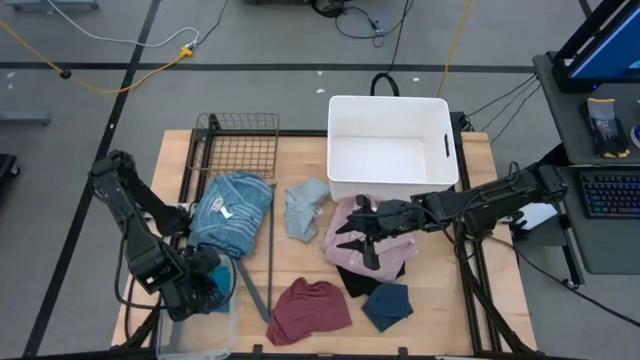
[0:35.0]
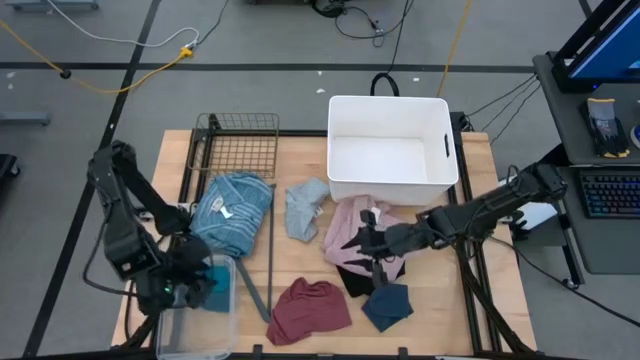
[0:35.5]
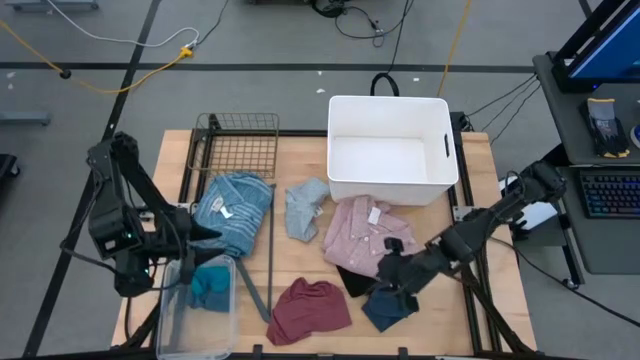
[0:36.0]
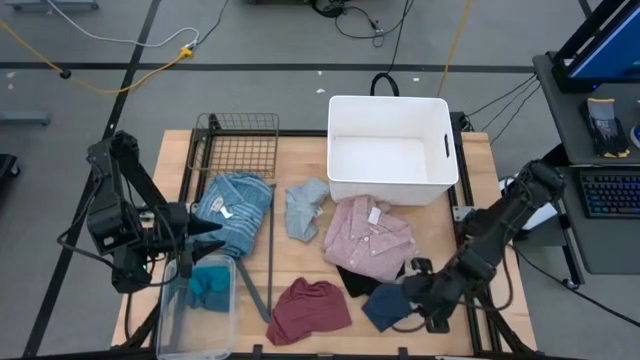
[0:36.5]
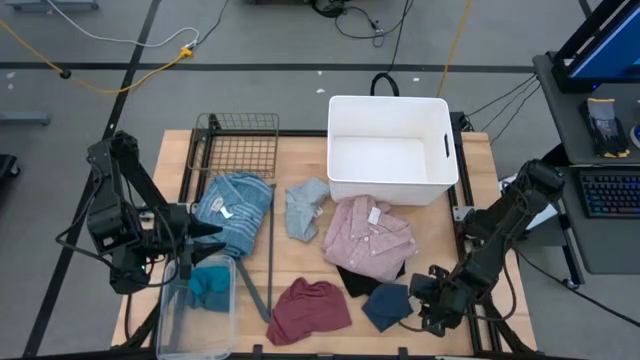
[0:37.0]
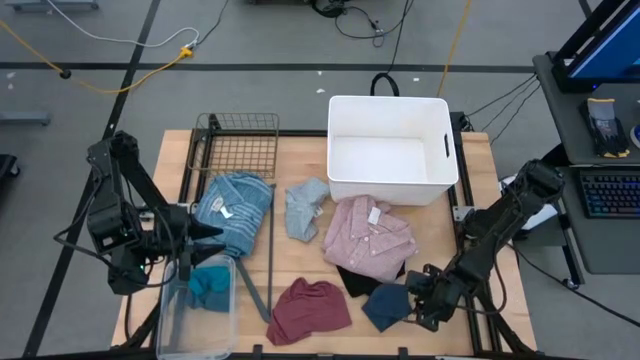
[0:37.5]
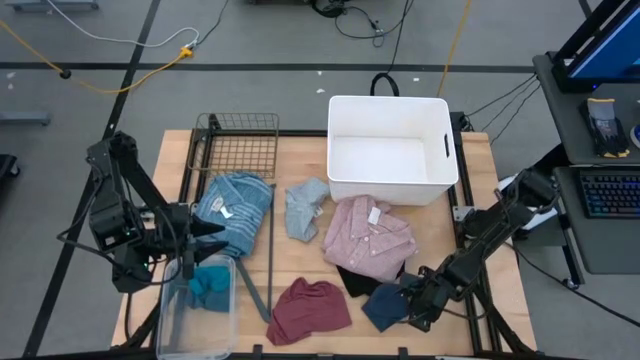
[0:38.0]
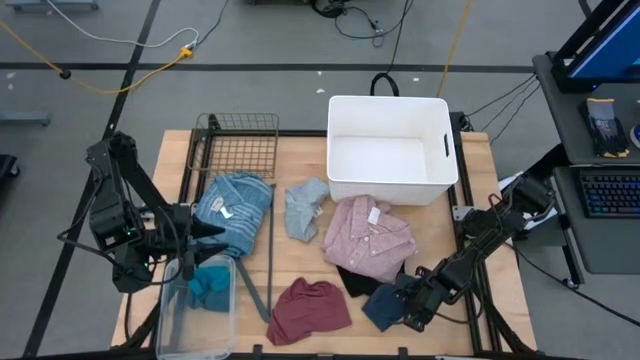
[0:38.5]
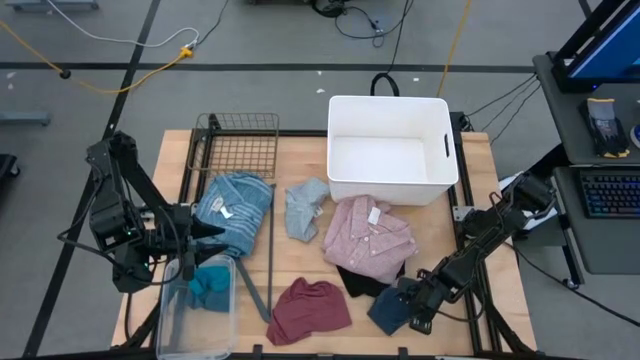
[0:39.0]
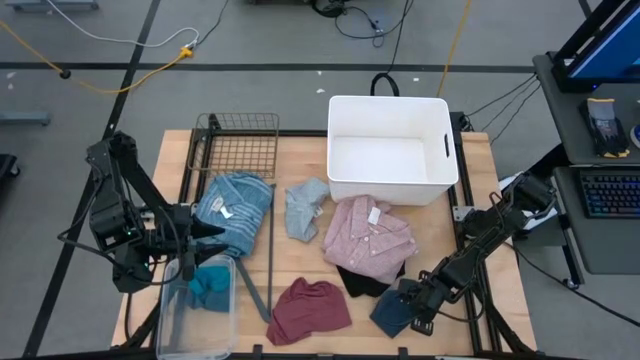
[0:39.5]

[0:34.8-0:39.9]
Task: Pick & Place Cloths
Put the blue sock into the transparent bin

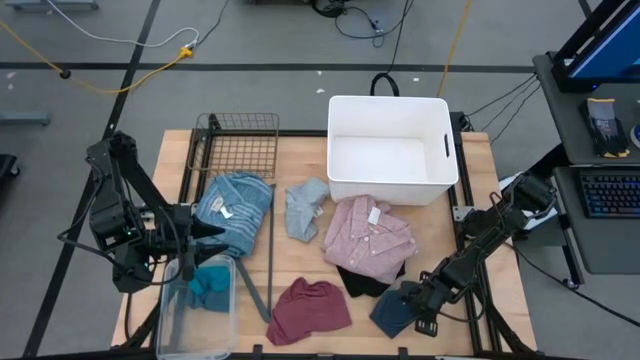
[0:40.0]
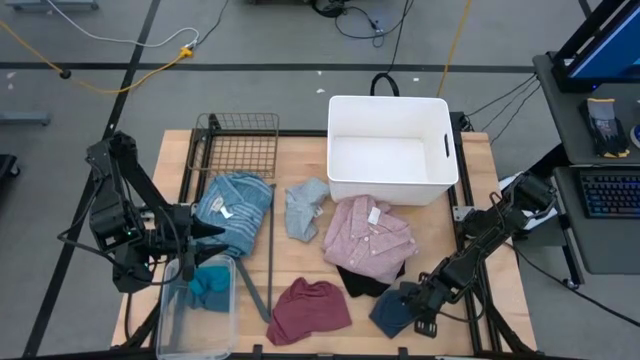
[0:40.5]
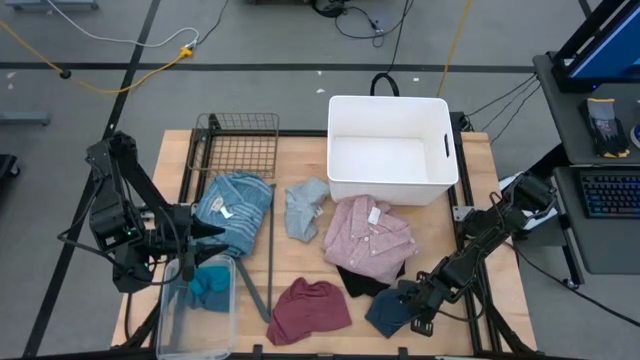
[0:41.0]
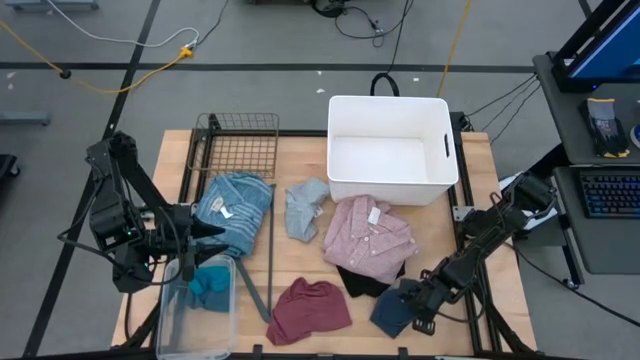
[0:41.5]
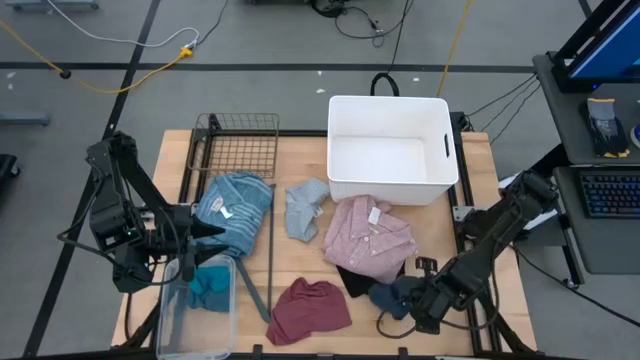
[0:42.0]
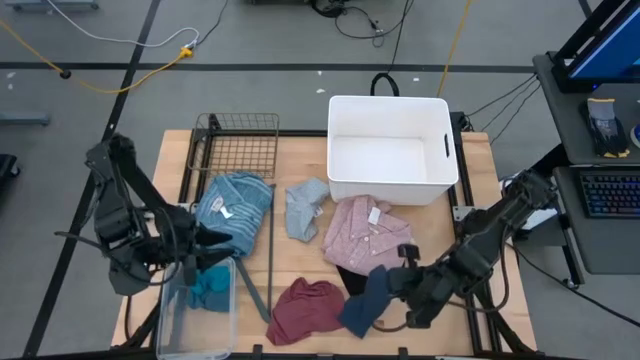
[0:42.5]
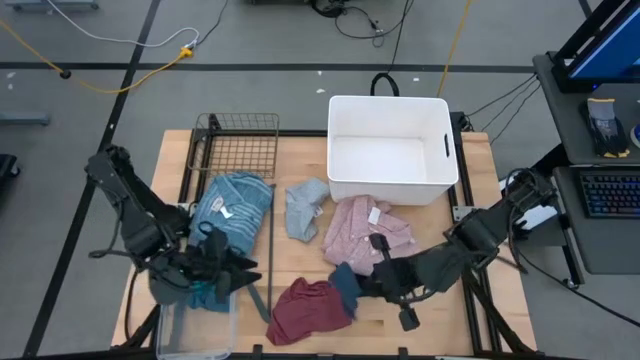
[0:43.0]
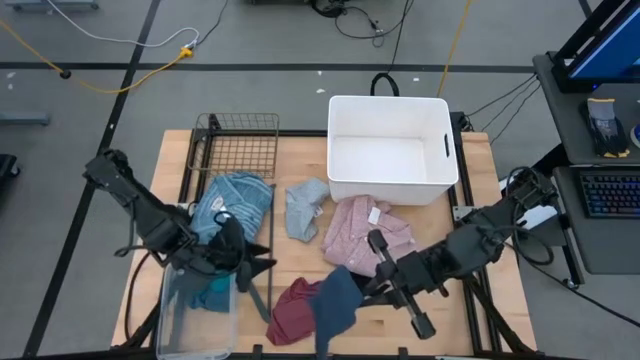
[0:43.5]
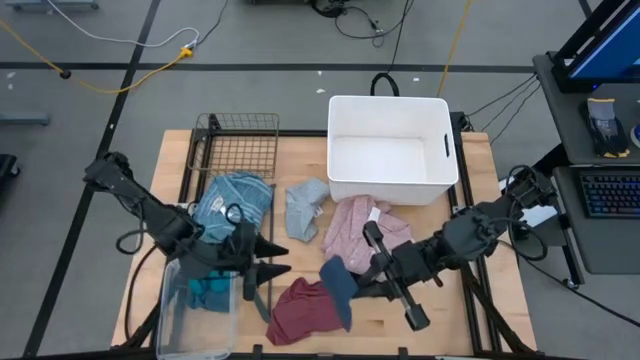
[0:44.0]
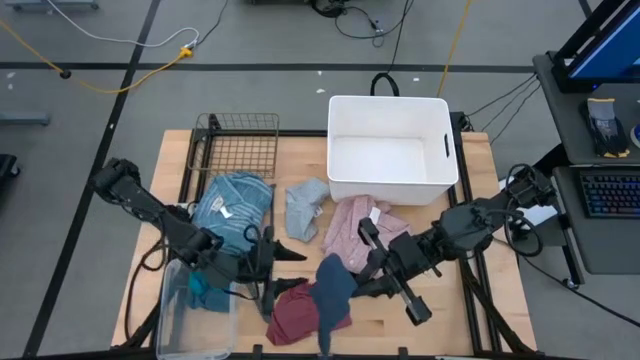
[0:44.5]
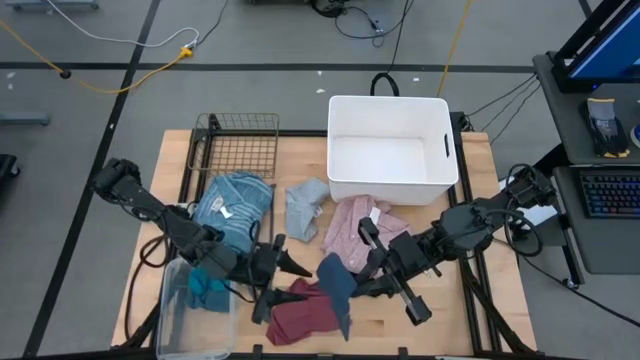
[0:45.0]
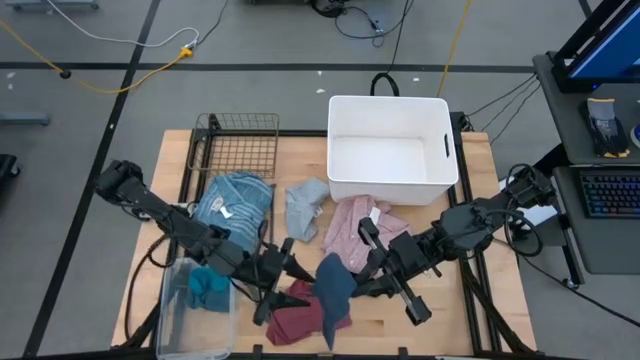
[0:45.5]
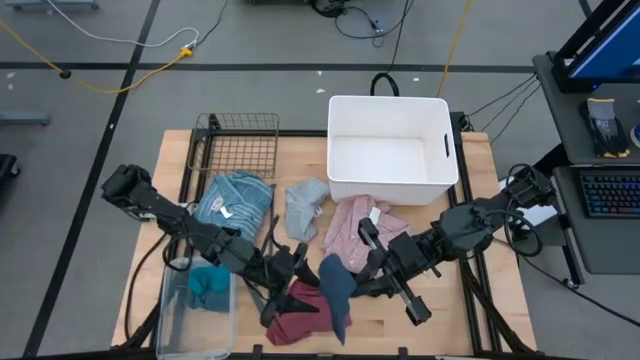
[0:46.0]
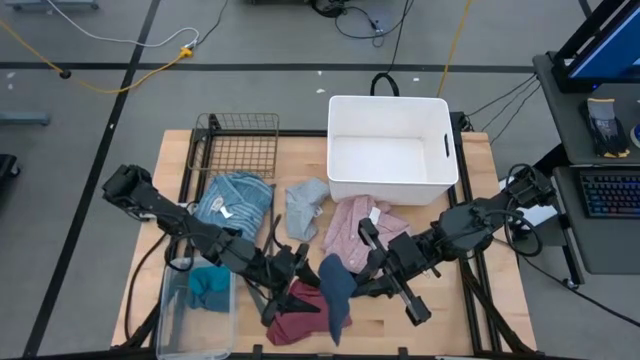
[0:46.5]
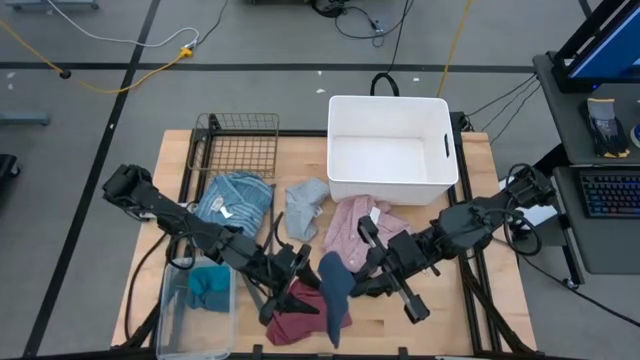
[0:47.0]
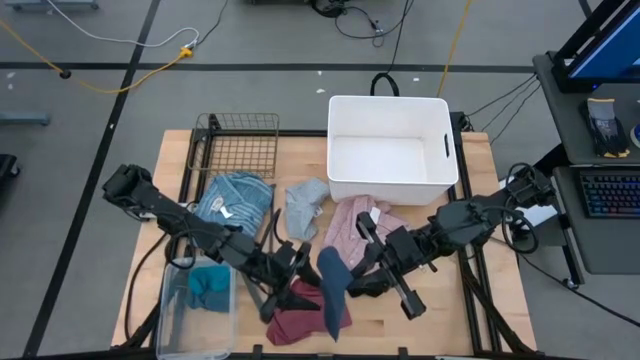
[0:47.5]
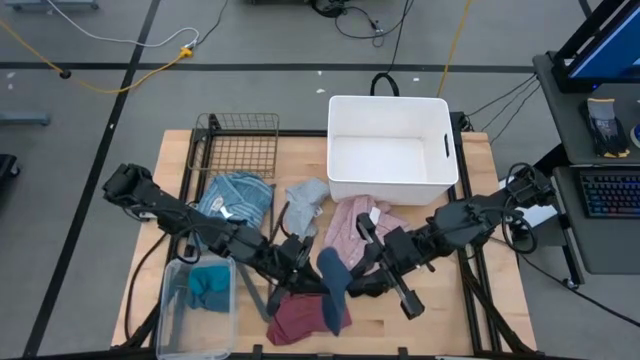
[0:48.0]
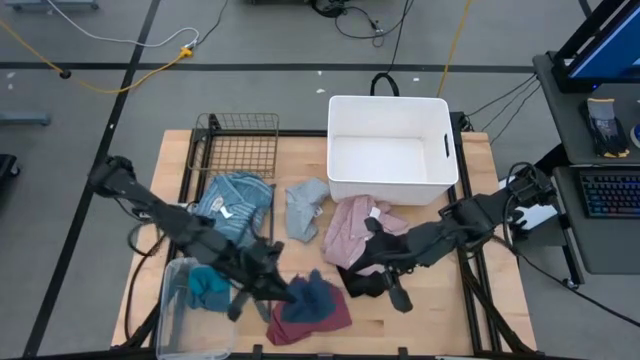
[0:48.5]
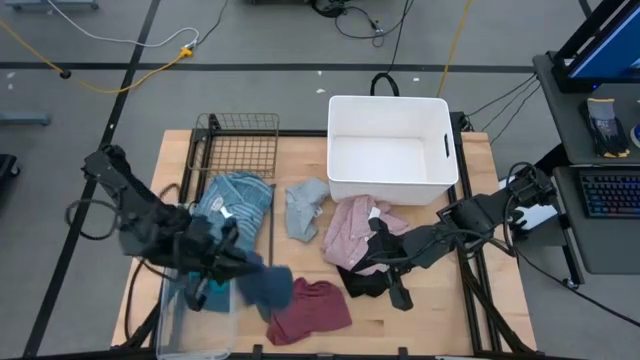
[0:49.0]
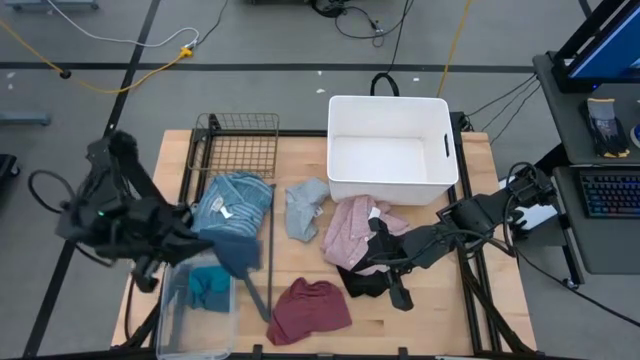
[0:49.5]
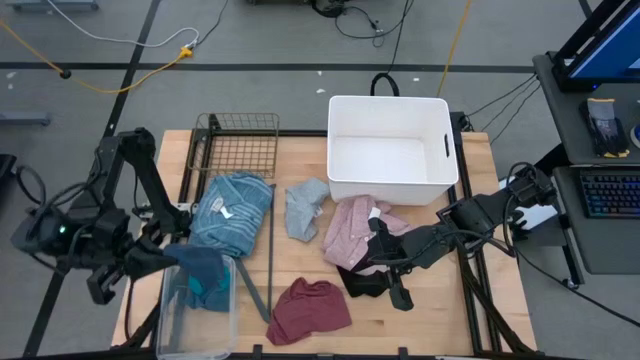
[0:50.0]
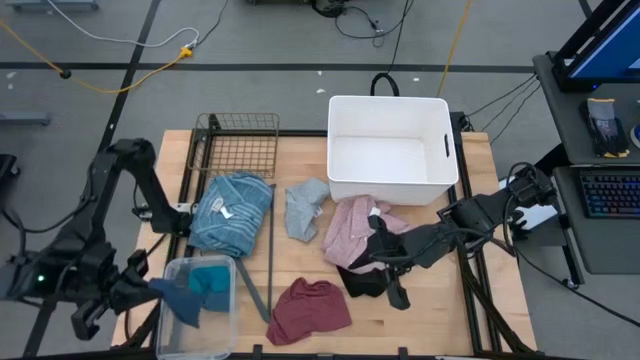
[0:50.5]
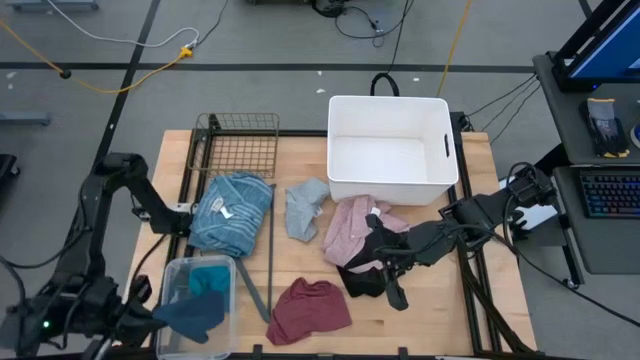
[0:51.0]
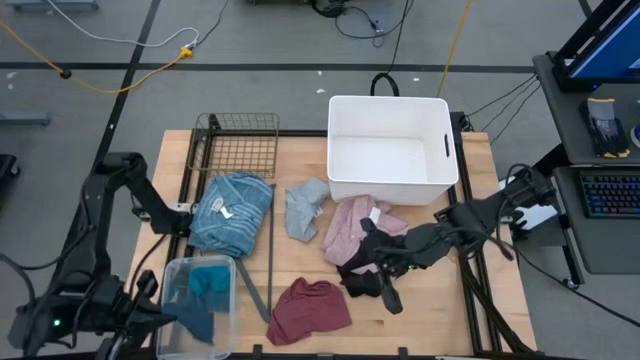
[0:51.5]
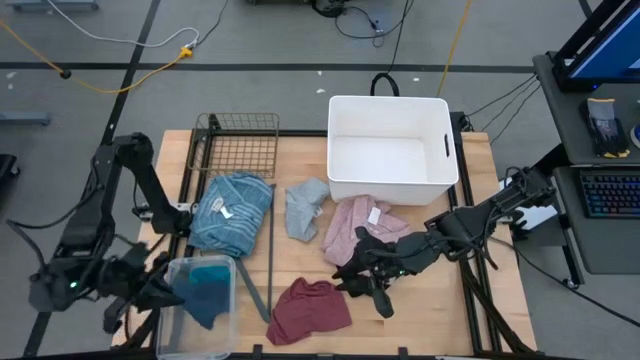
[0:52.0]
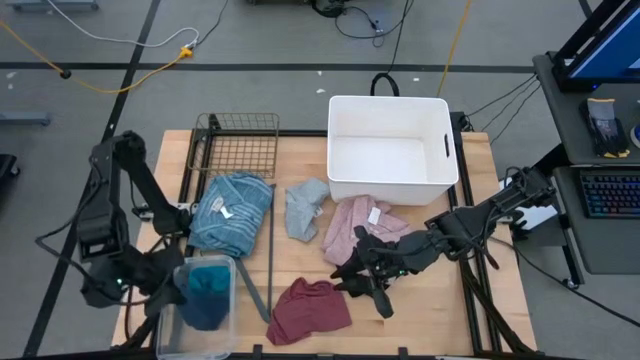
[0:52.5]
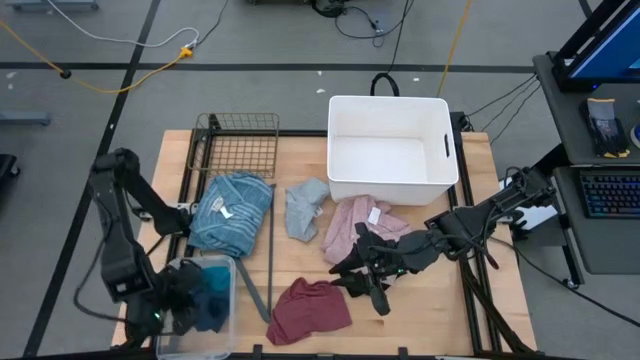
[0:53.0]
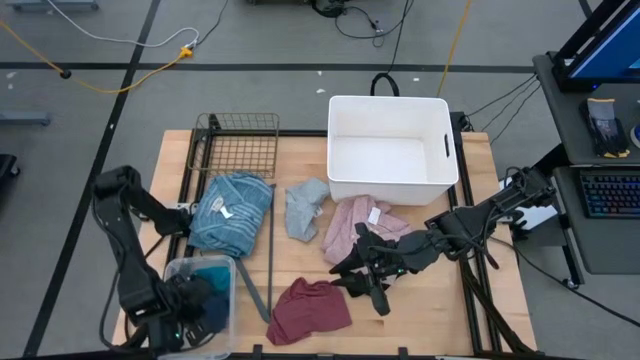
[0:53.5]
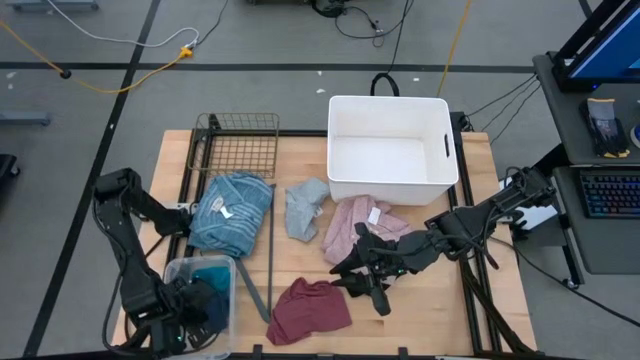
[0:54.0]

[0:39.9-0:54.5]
Put the dark blue sock into the transparent bin

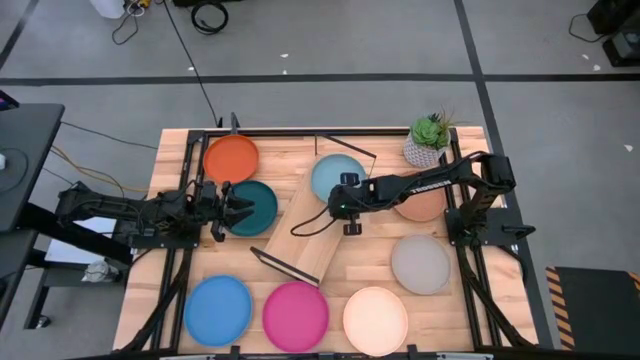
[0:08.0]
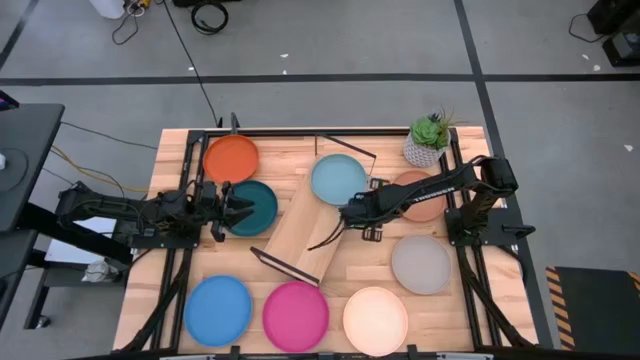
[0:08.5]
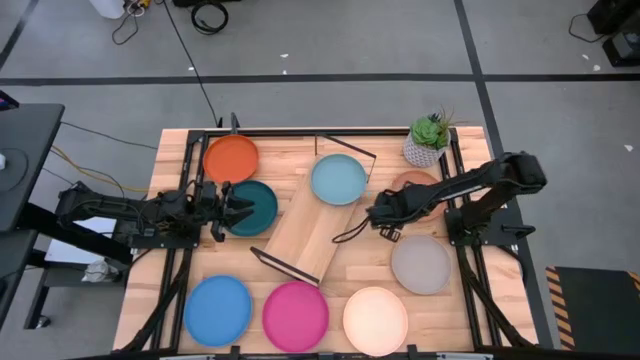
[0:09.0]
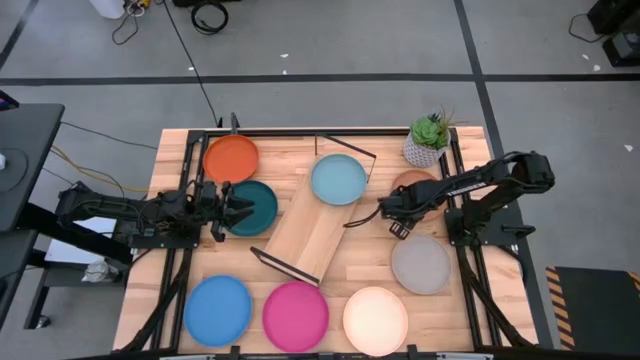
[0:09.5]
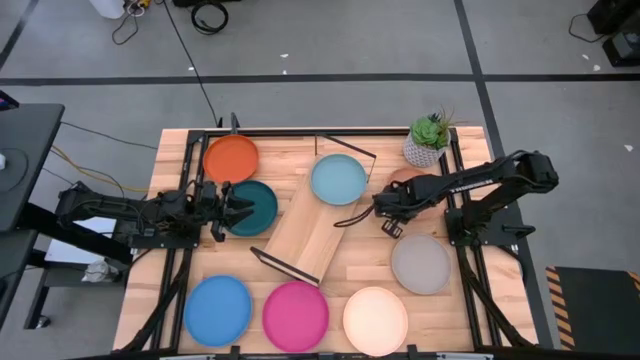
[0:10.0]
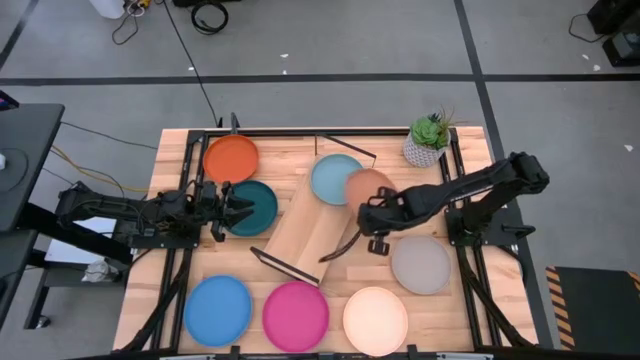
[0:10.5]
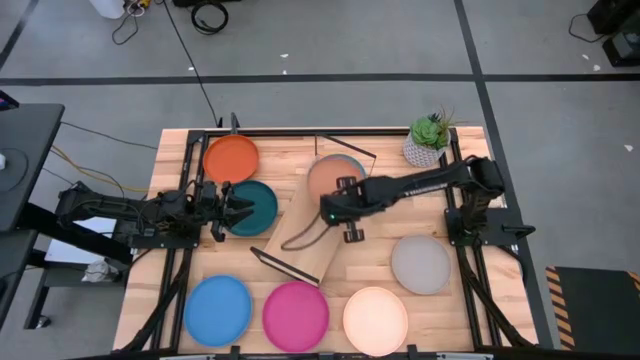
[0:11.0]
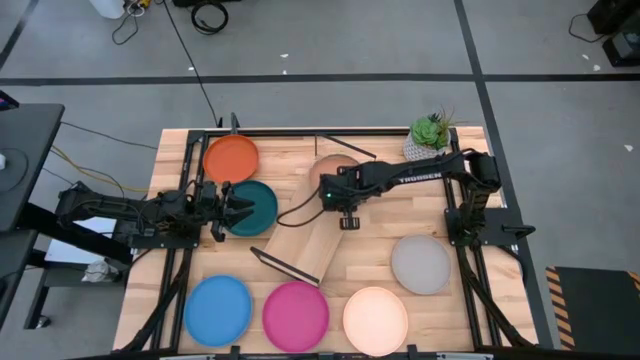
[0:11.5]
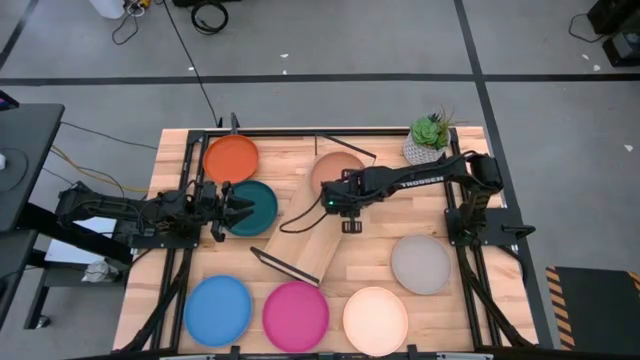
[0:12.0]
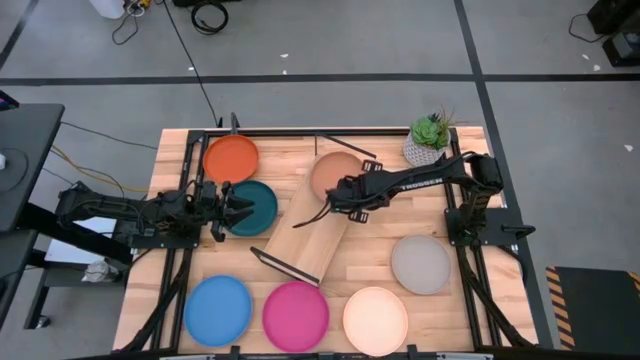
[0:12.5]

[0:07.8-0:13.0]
Task: Place and stack plates onto a shelf
Stack the brown plate on the top of the light blue plate on the shelf
